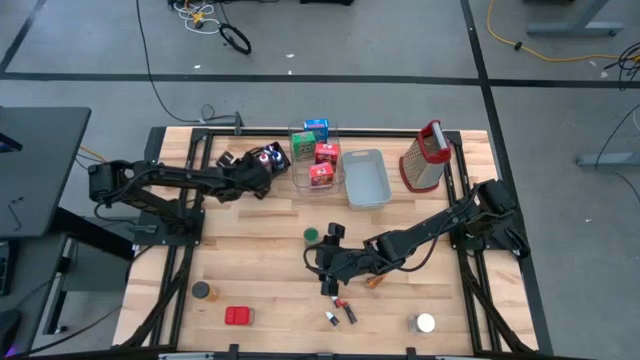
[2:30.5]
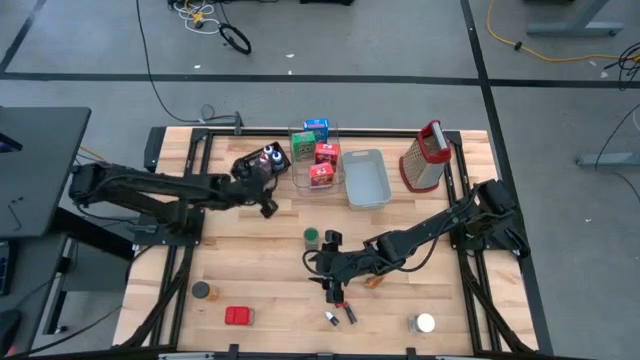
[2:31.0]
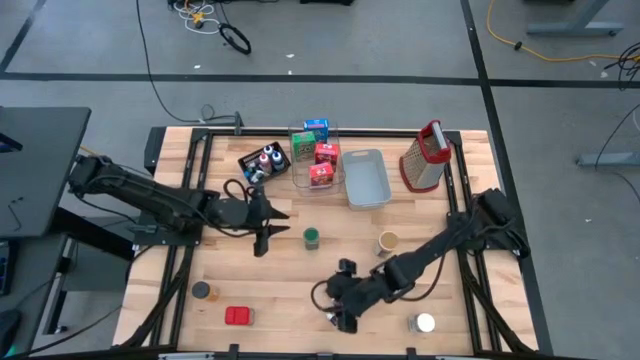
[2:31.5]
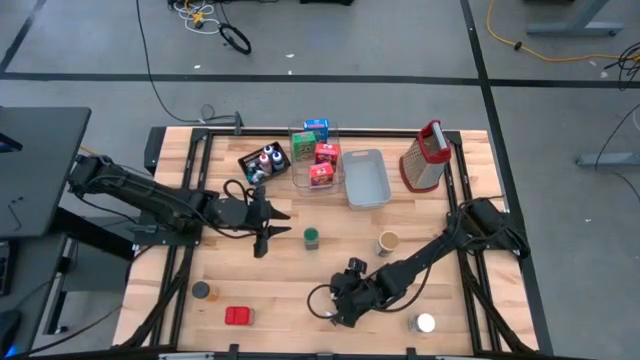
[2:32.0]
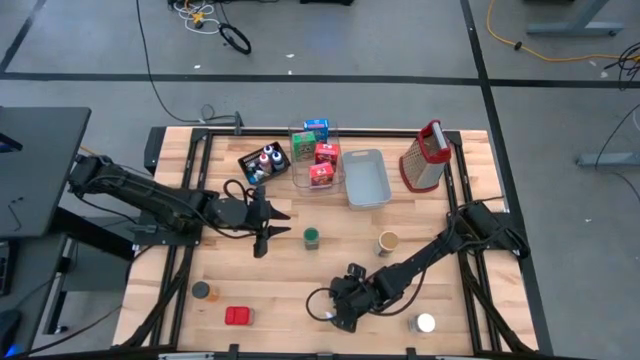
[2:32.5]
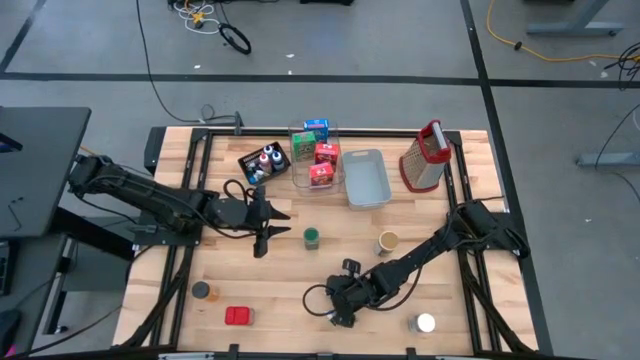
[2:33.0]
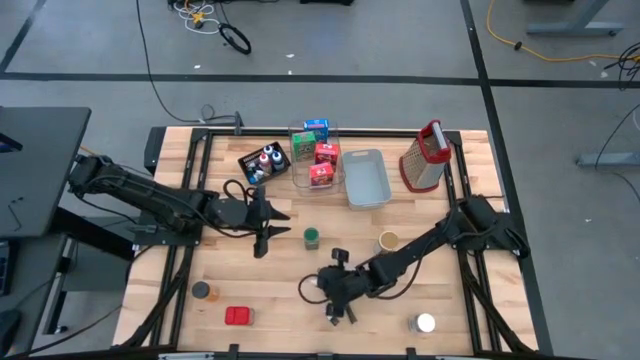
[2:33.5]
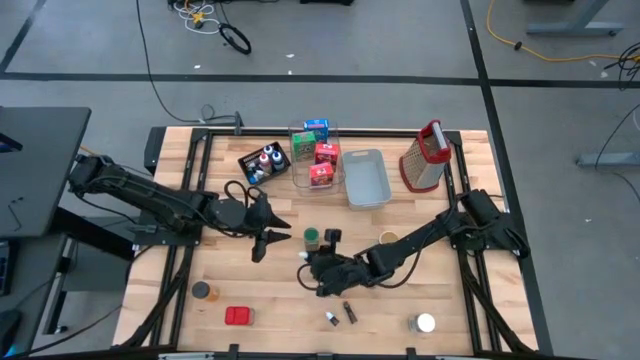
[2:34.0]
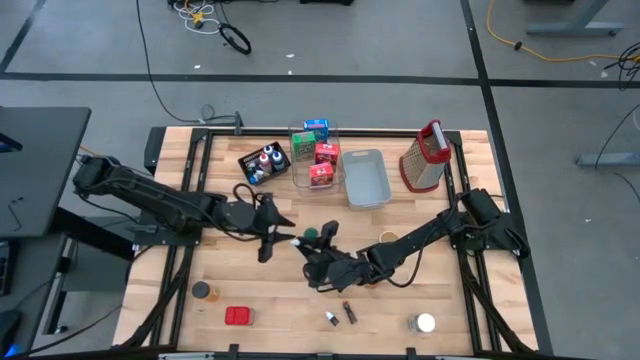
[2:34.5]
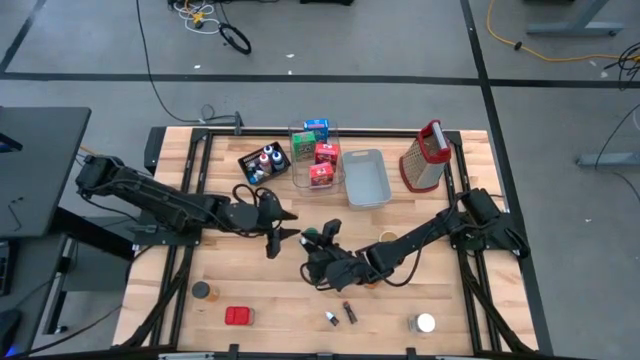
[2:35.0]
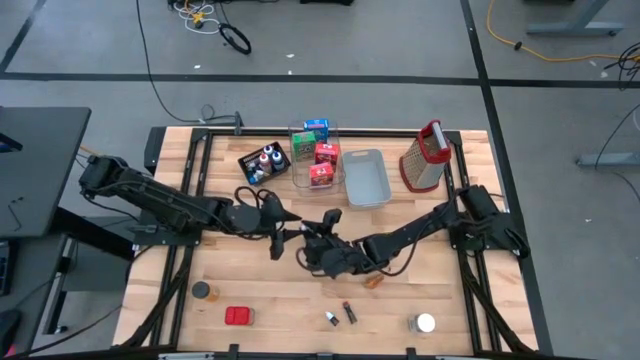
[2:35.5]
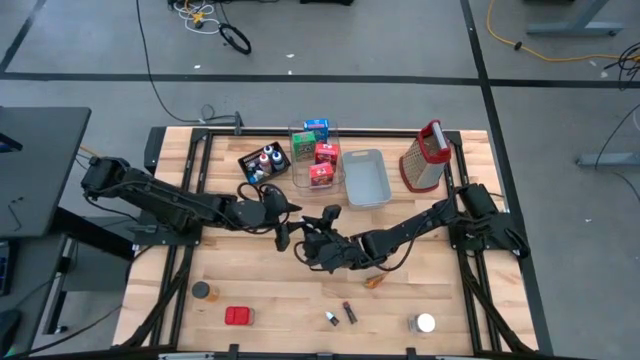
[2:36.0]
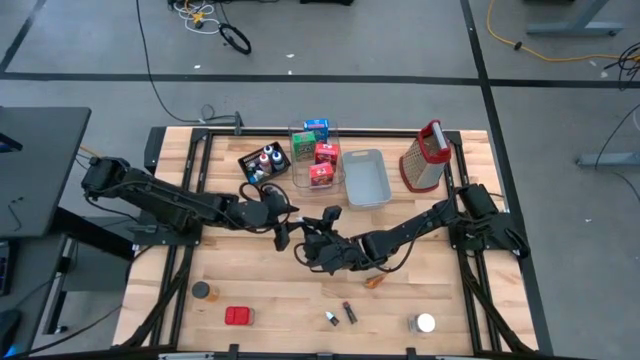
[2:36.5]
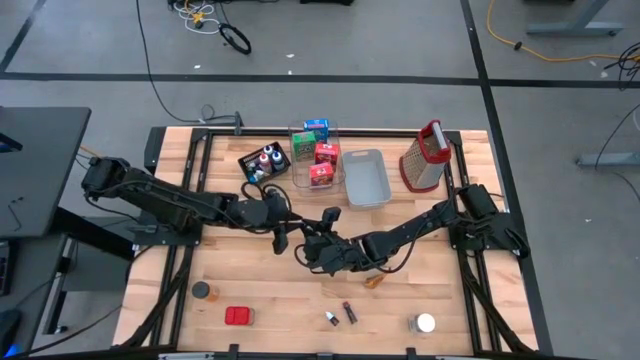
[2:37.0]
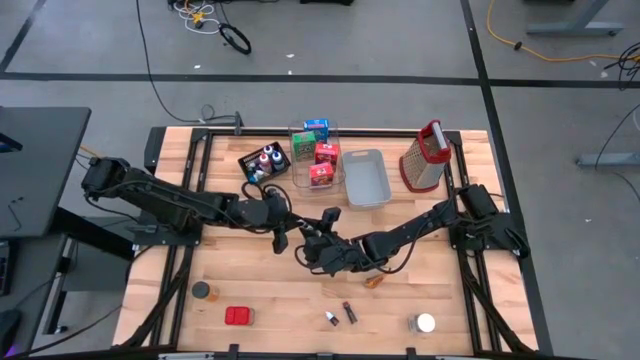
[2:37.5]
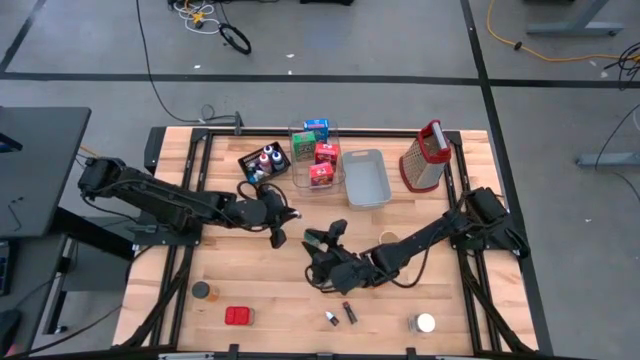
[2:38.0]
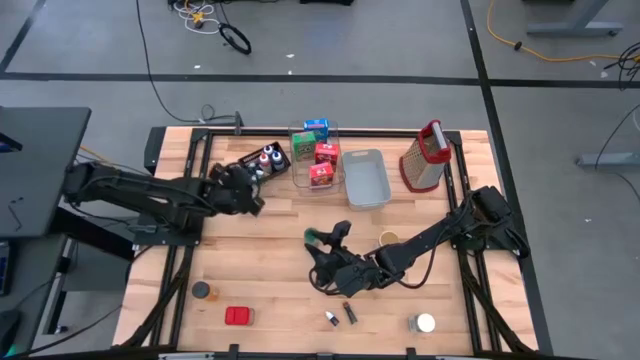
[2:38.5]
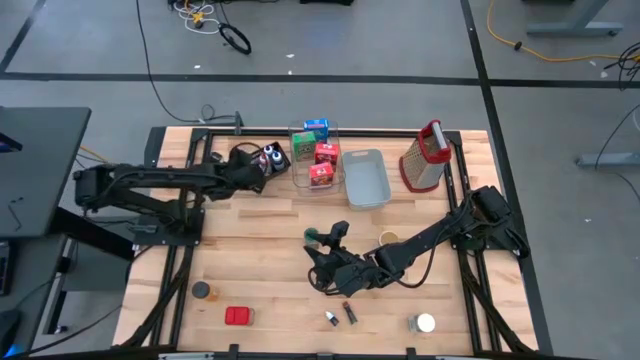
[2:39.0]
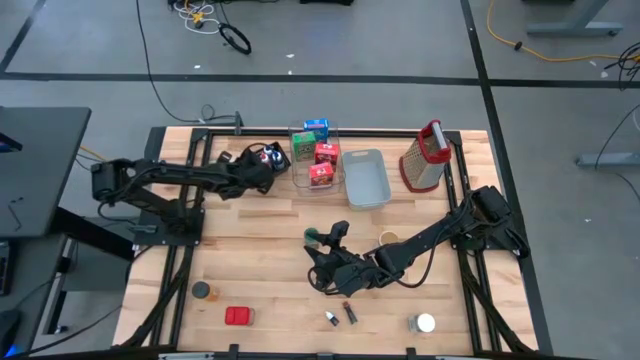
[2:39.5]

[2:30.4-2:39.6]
Task: Pick & Place Kitchen Items
Put the top small red food coloring bottle into the black bin

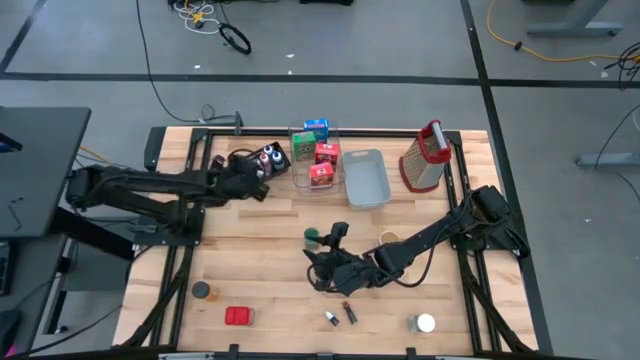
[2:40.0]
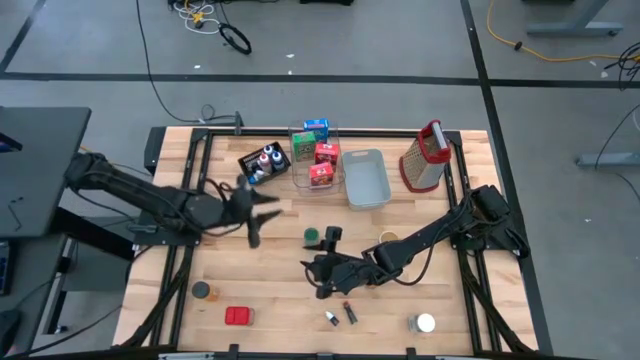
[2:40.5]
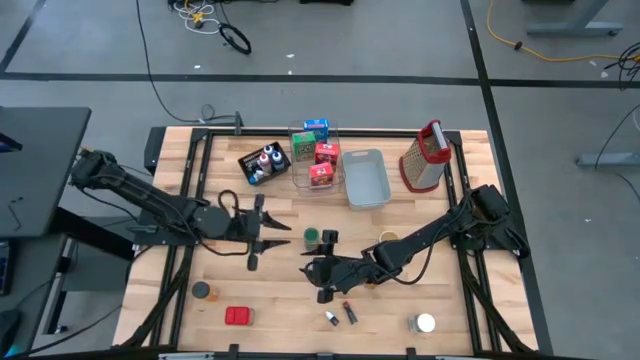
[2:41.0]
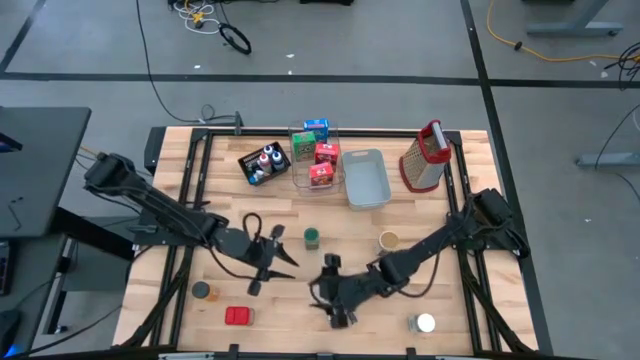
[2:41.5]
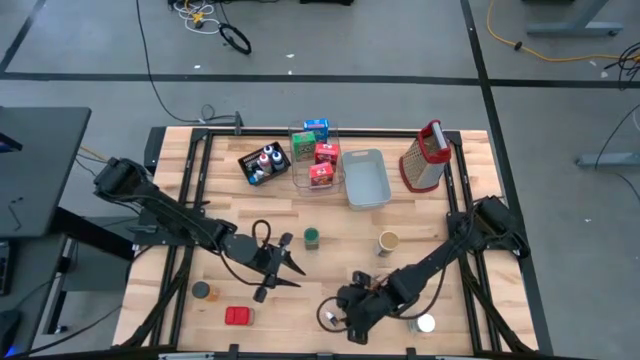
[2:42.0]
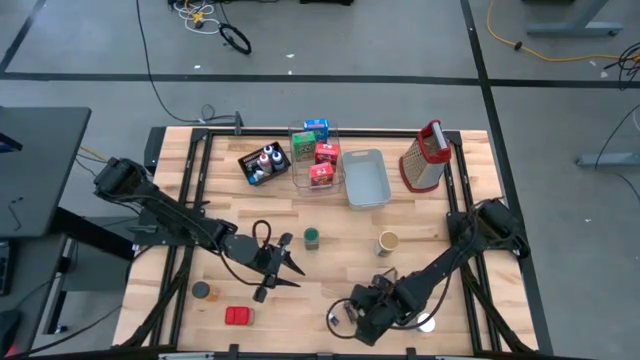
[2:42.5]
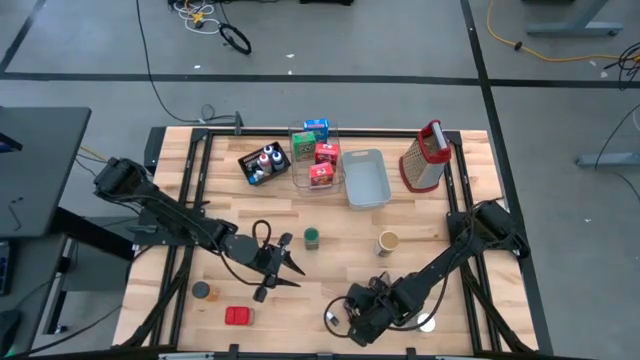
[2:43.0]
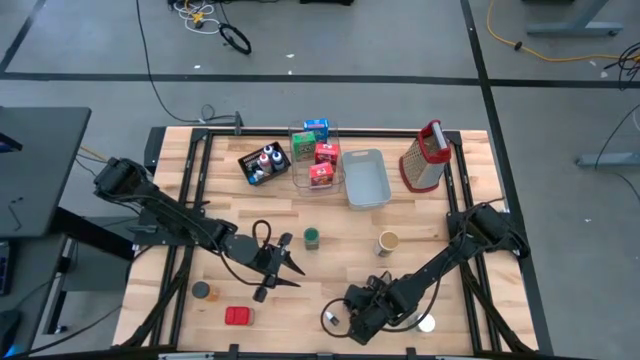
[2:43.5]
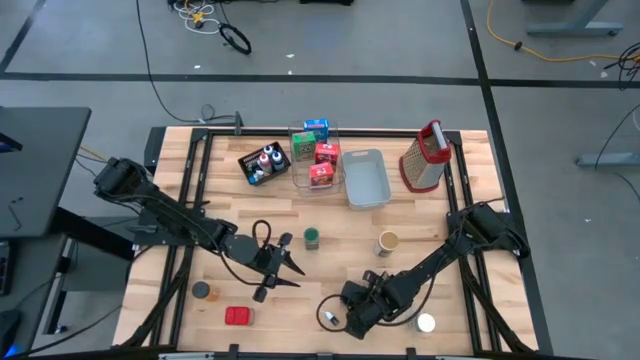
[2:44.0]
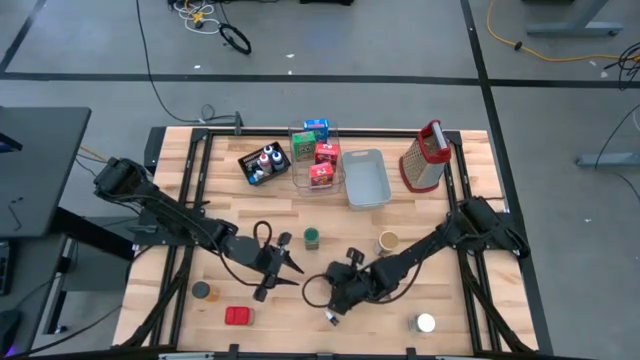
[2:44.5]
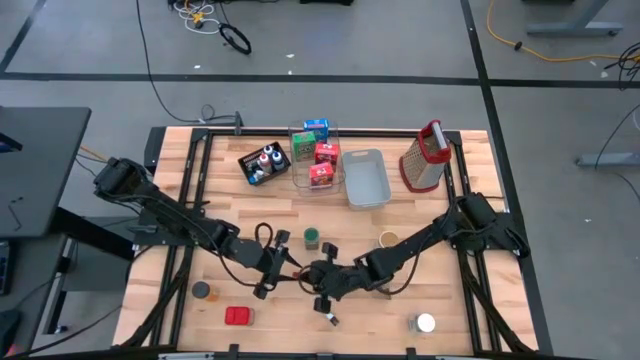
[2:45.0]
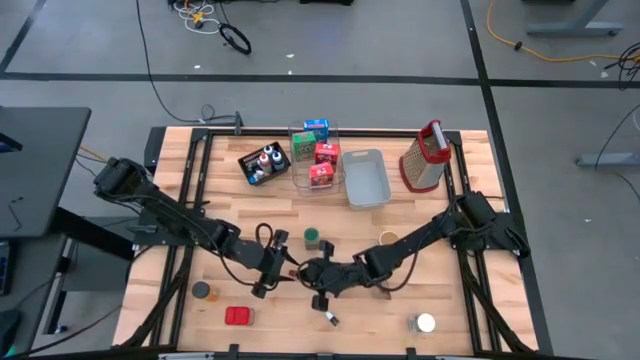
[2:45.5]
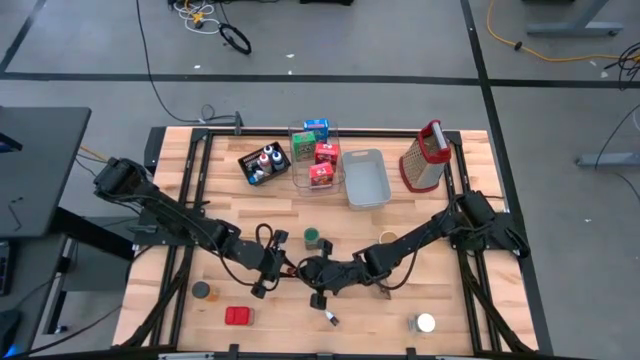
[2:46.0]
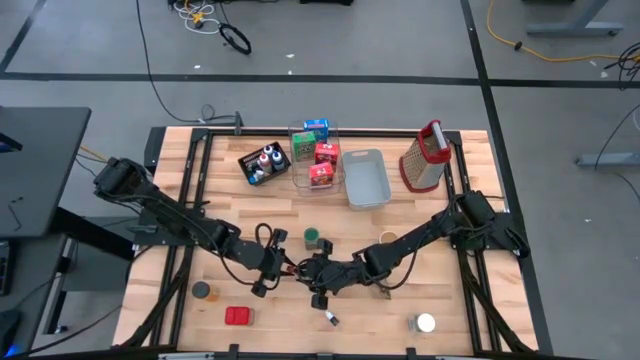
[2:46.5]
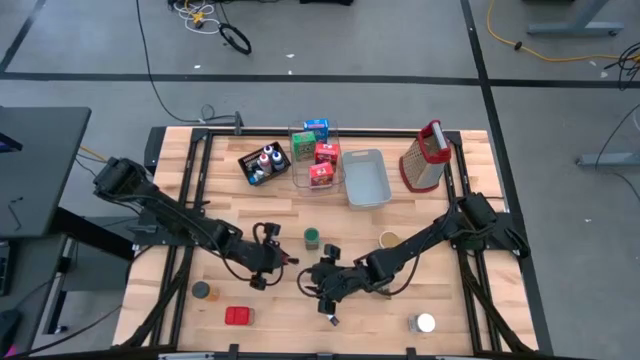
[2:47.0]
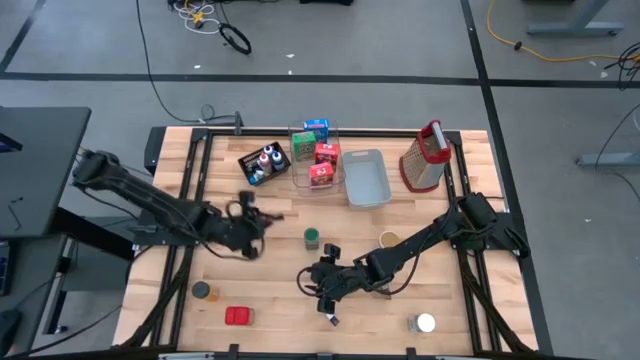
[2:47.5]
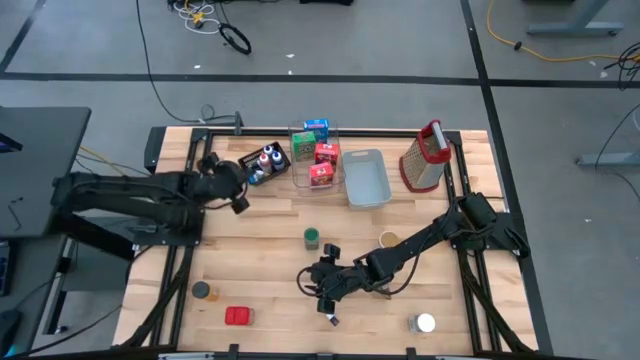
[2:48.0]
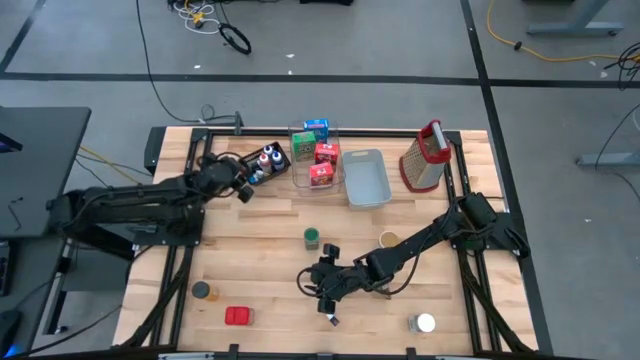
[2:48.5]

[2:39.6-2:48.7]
Put the right small red food coloring bottle into the black bin

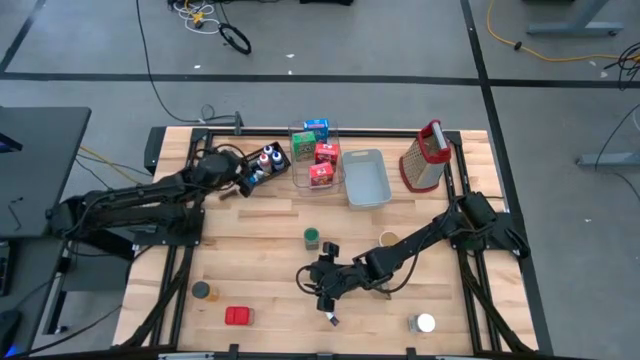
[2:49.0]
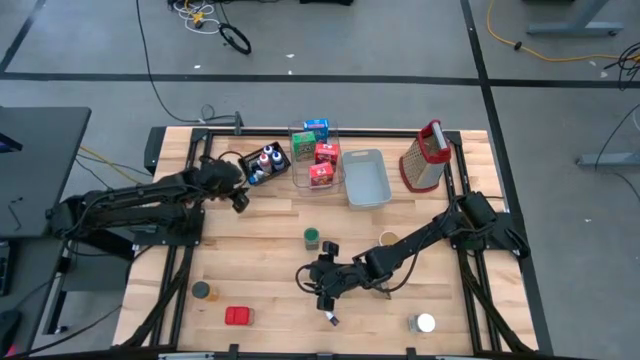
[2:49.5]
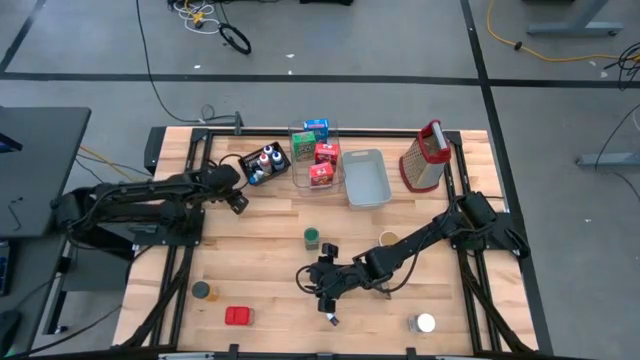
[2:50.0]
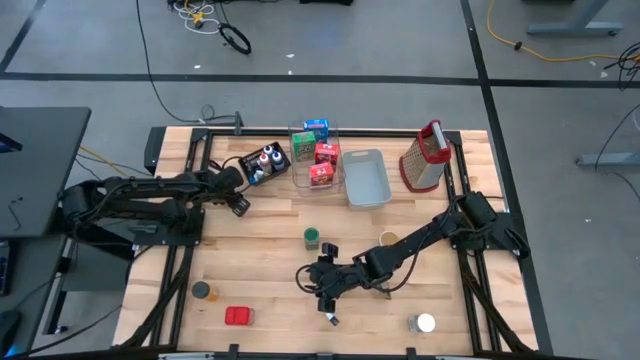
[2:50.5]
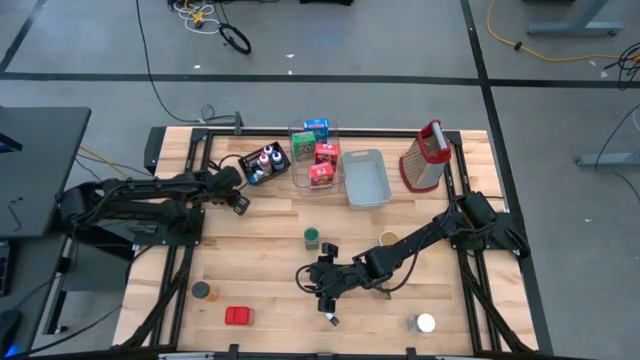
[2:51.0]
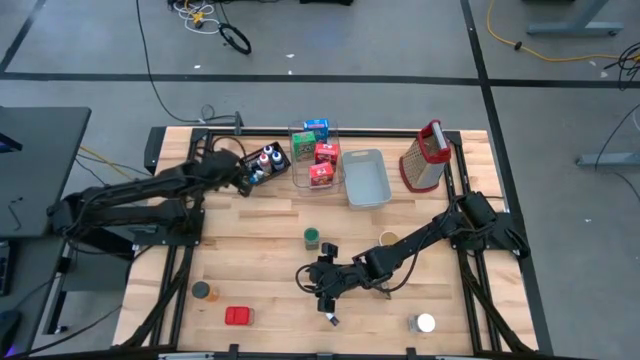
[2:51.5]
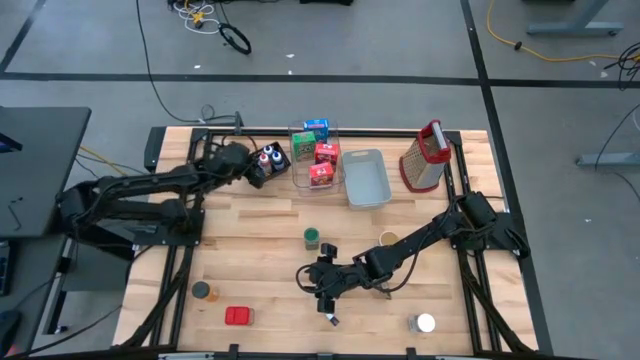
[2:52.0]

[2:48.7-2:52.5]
Put the top small red food coloring bottle into the black bin
